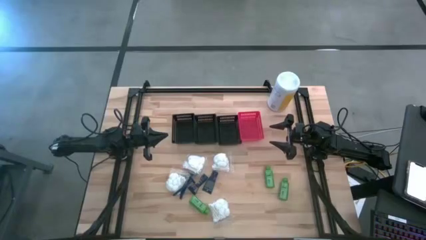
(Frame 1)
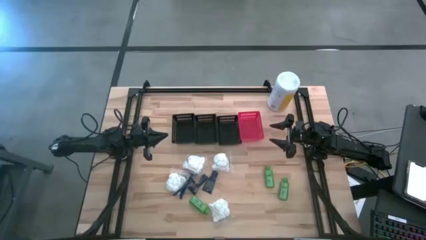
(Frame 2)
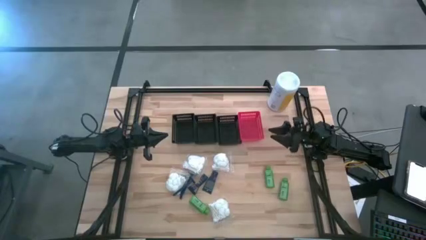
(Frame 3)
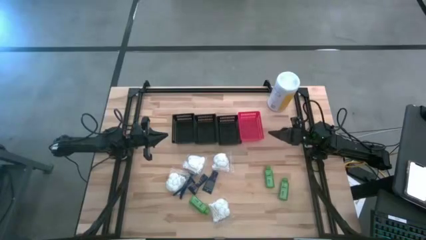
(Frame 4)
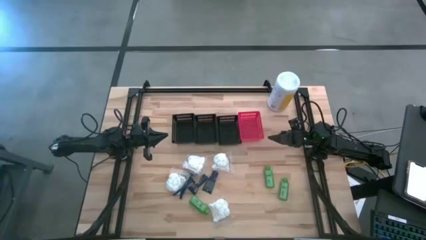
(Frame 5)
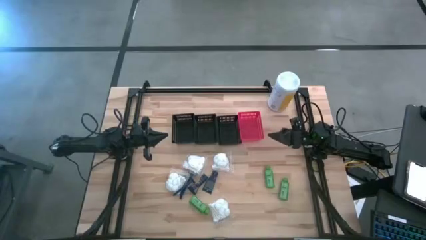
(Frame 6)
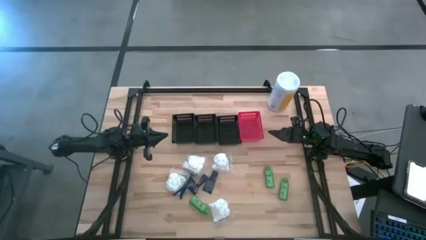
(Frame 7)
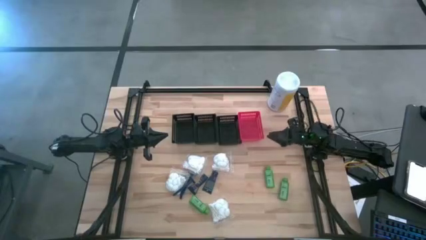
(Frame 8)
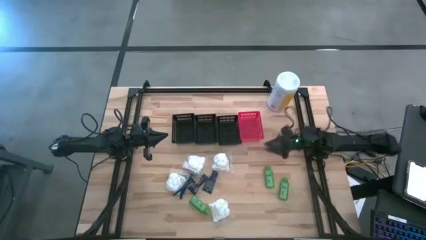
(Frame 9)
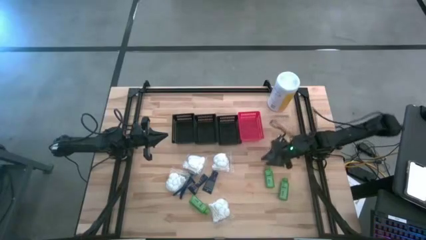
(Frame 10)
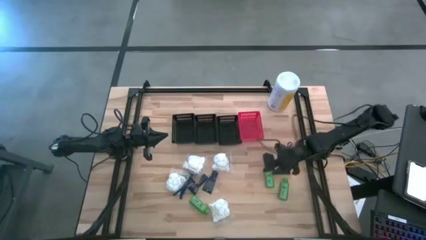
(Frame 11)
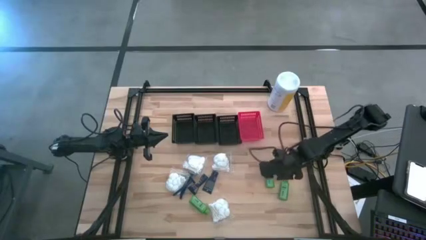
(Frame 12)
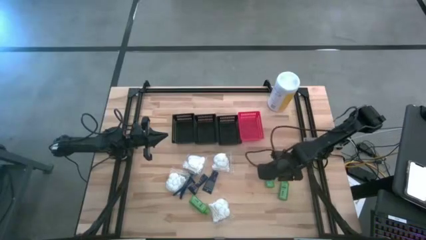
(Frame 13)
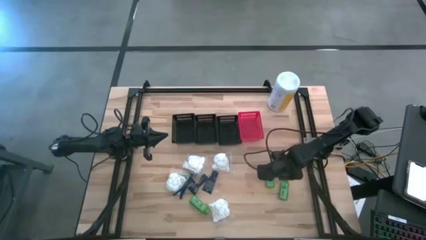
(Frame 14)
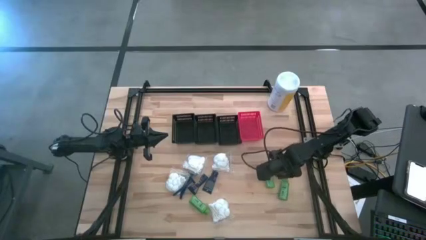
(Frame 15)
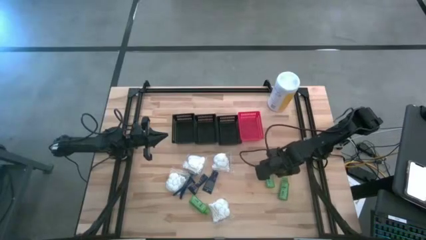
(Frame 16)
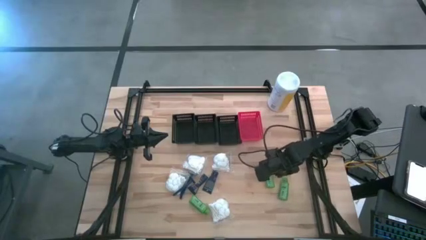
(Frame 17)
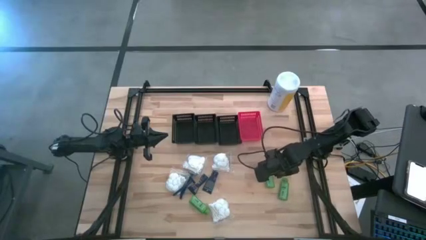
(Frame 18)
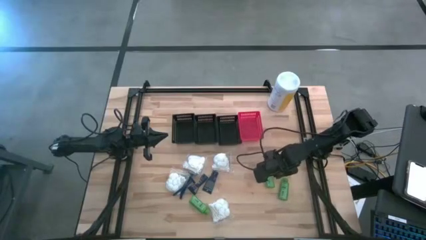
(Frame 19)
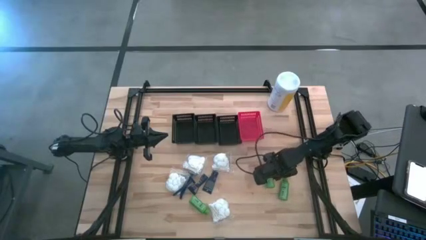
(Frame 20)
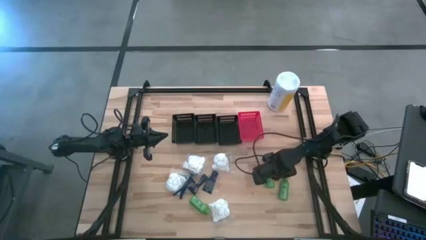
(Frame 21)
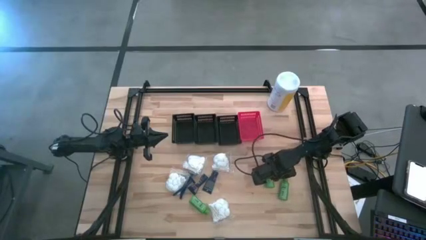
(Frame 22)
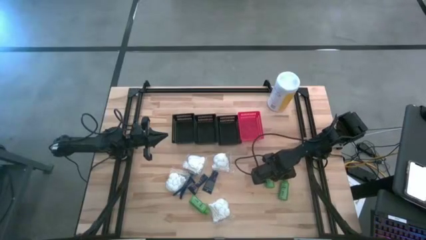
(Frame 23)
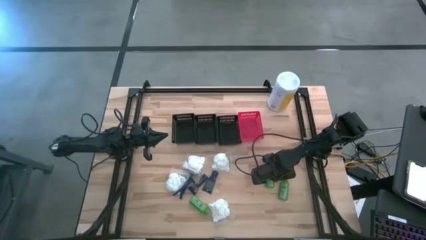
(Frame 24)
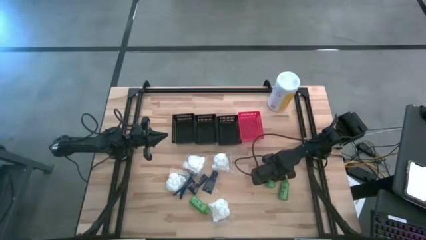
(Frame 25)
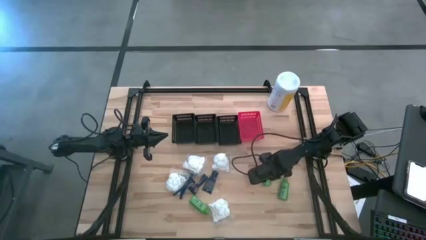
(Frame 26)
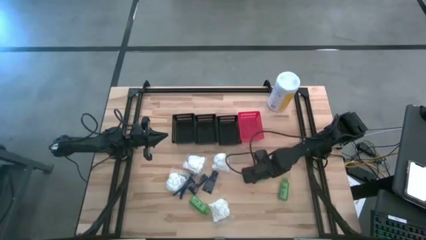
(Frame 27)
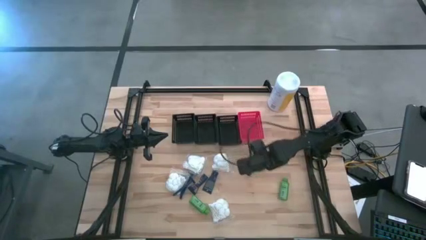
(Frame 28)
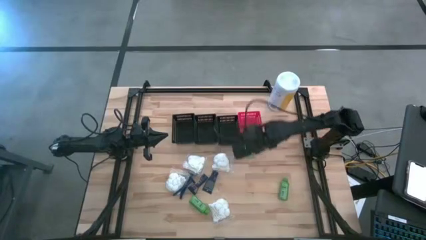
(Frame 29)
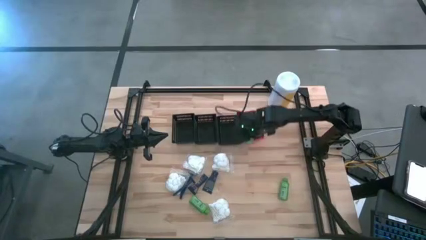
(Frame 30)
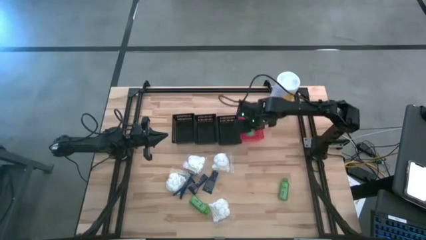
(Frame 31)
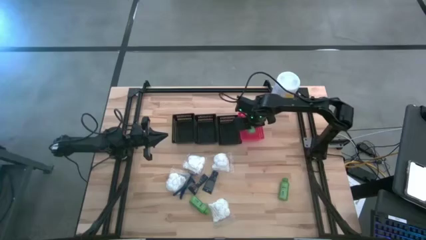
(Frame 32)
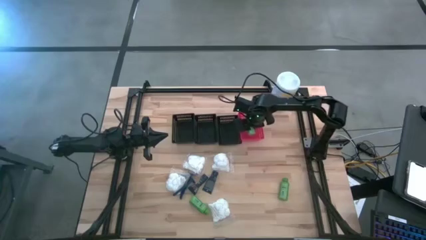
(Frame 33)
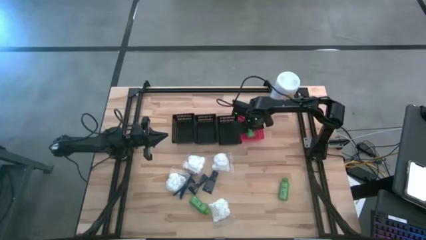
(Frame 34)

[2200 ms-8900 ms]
Task: Pick & Place Travel size toiletries
Put the green shampoo into the red bin

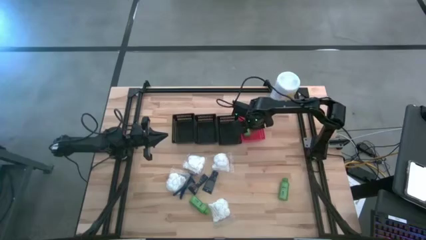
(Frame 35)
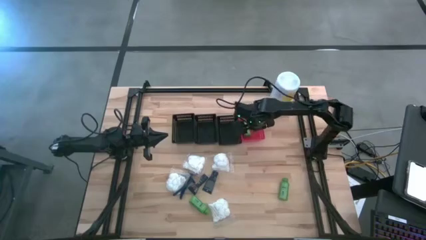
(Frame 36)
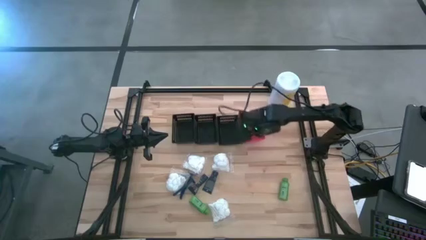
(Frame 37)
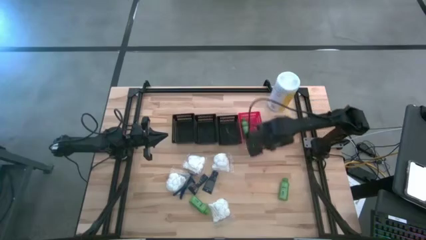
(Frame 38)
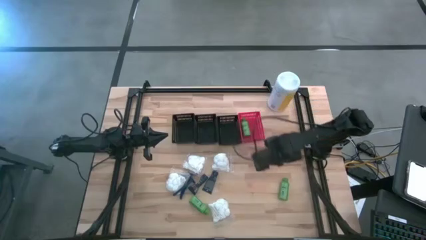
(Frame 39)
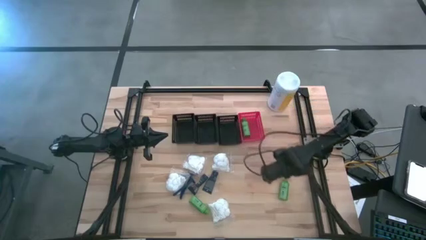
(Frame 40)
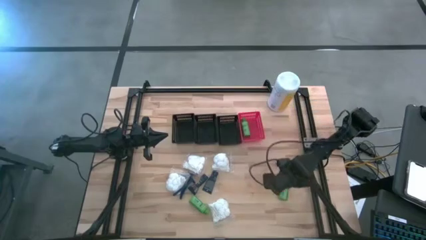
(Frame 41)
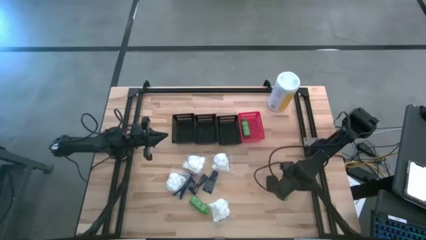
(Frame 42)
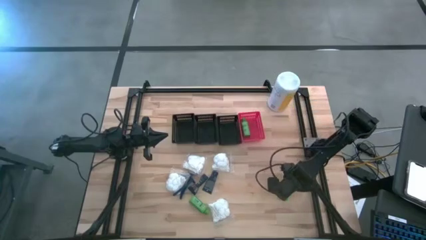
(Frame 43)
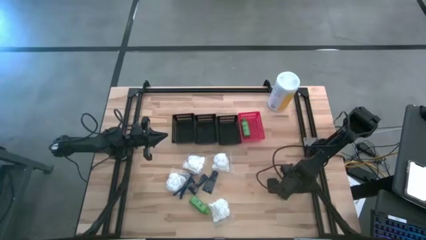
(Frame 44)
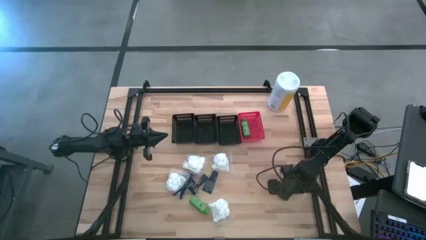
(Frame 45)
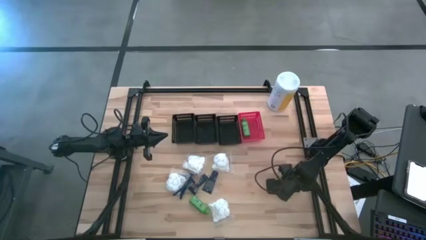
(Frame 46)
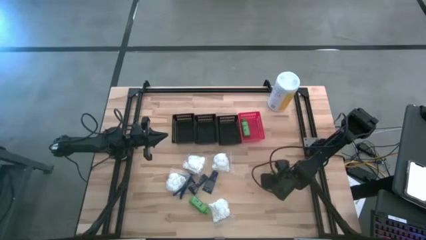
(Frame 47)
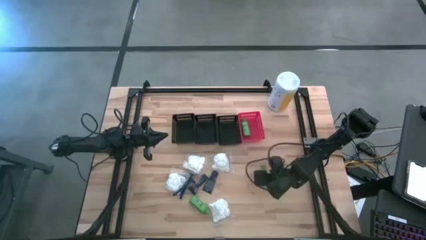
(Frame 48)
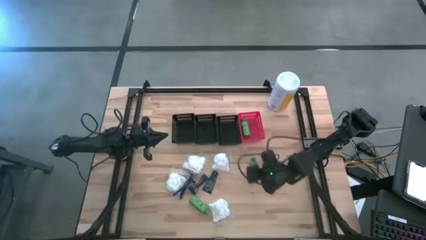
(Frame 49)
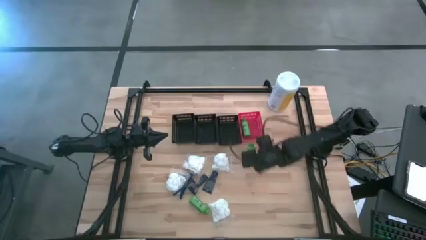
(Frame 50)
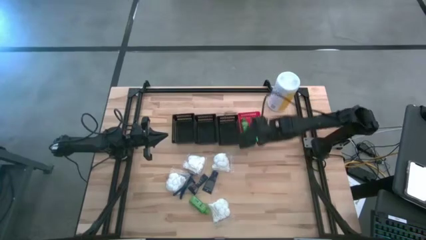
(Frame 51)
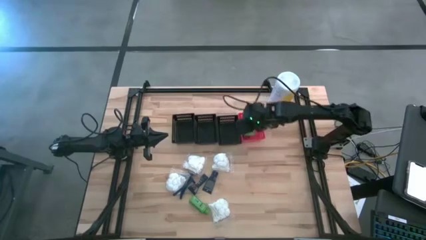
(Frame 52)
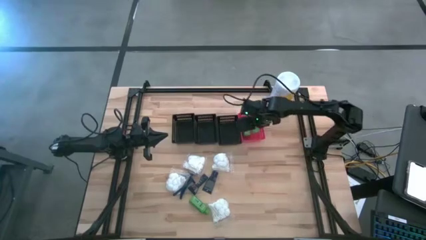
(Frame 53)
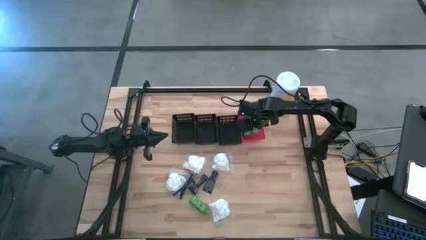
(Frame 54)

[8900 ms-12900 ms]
Put the green shampoo into the red bin

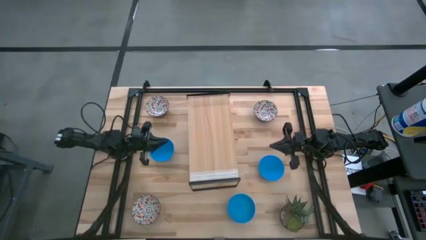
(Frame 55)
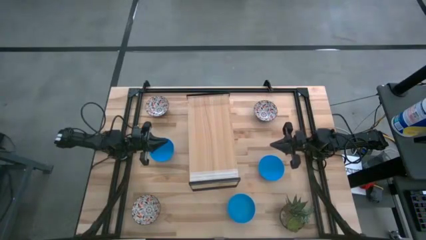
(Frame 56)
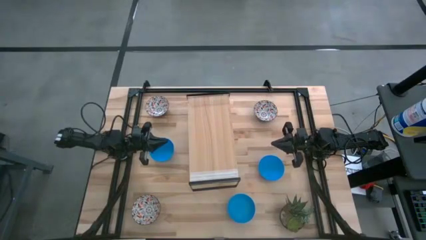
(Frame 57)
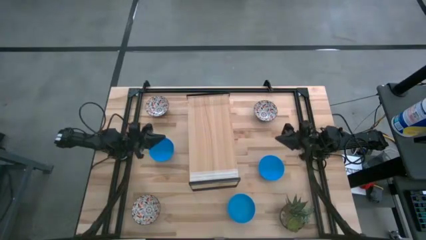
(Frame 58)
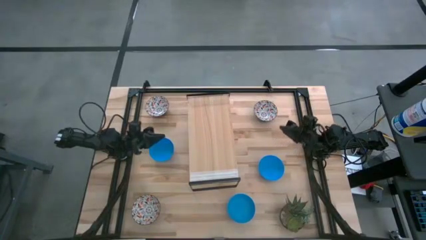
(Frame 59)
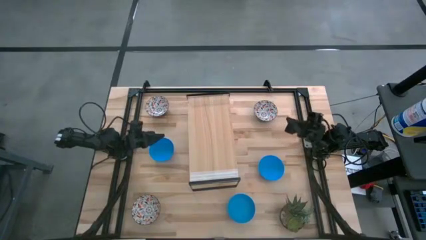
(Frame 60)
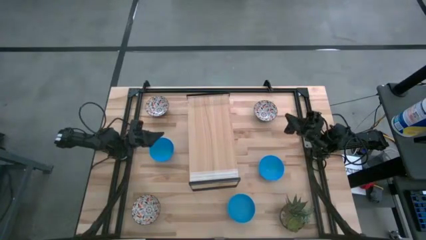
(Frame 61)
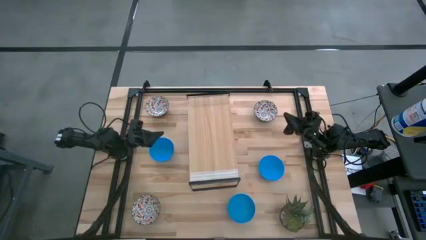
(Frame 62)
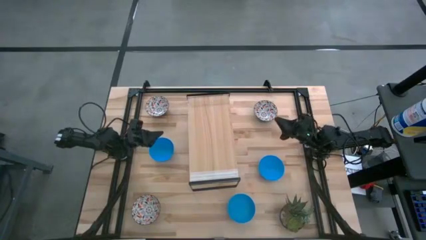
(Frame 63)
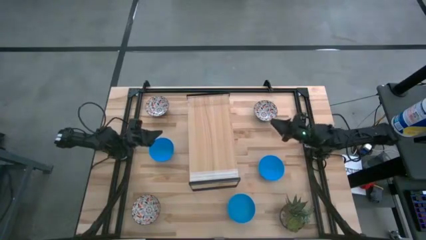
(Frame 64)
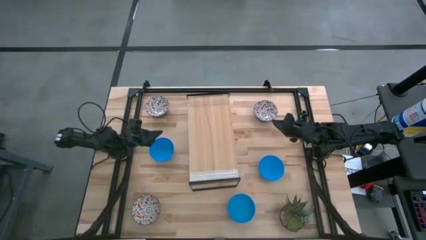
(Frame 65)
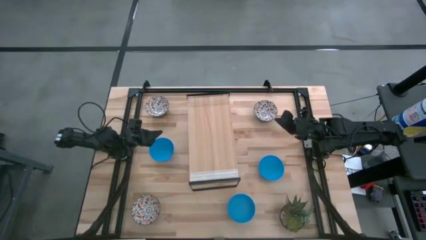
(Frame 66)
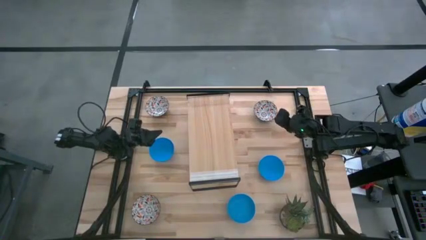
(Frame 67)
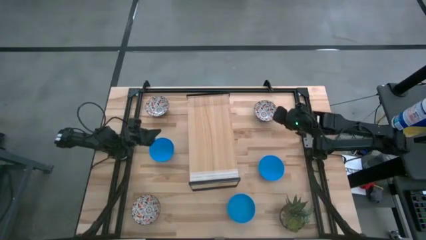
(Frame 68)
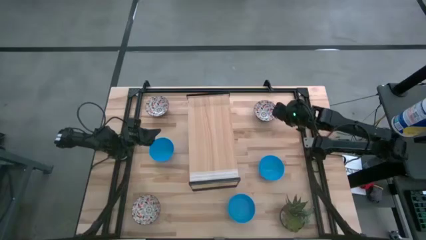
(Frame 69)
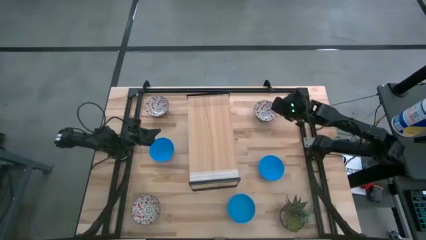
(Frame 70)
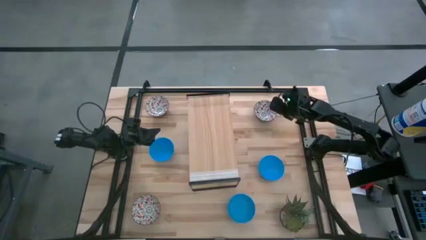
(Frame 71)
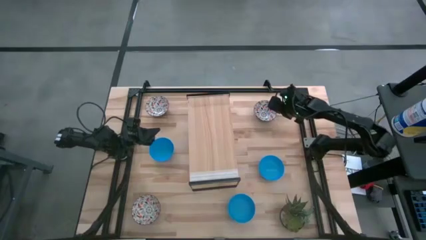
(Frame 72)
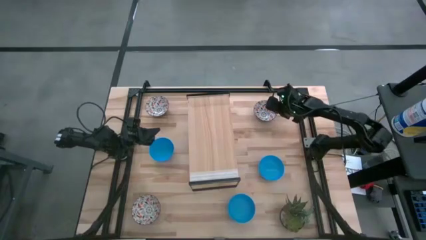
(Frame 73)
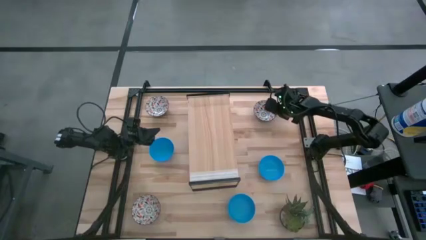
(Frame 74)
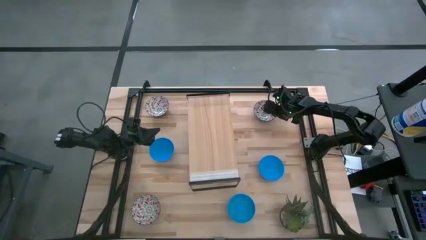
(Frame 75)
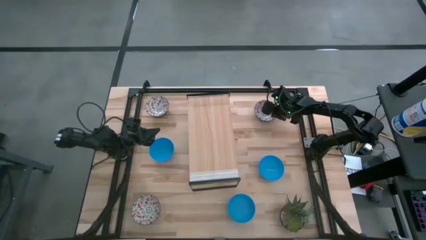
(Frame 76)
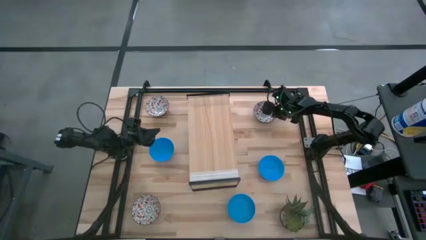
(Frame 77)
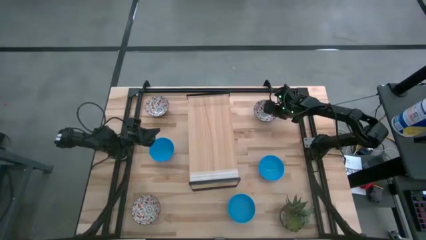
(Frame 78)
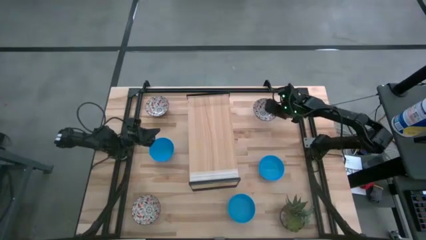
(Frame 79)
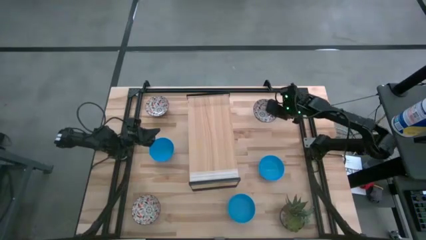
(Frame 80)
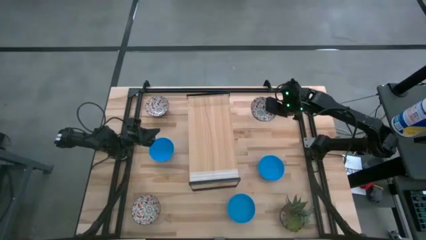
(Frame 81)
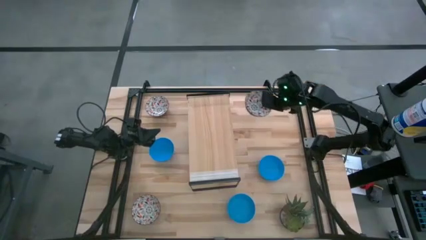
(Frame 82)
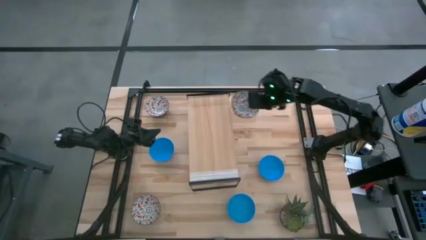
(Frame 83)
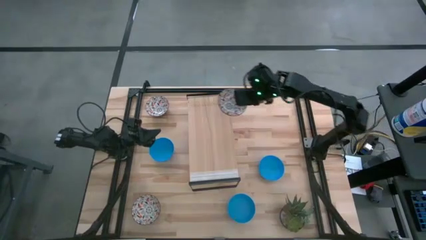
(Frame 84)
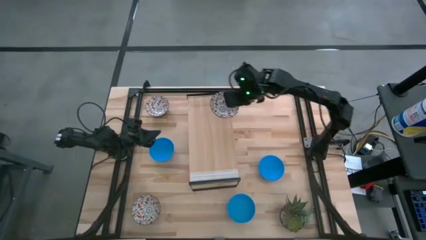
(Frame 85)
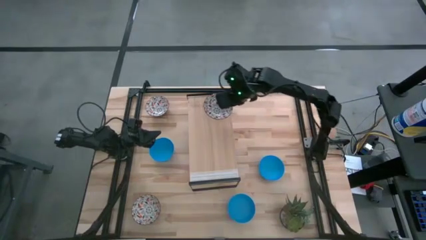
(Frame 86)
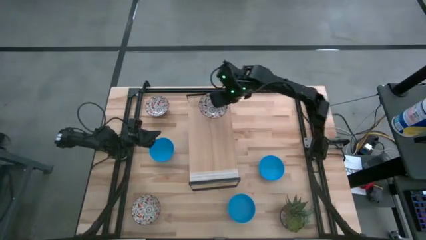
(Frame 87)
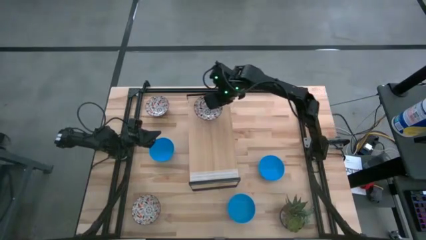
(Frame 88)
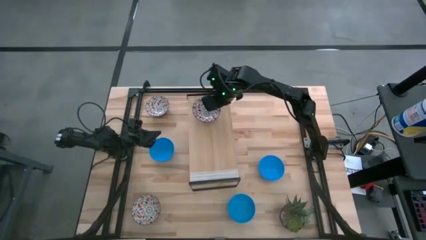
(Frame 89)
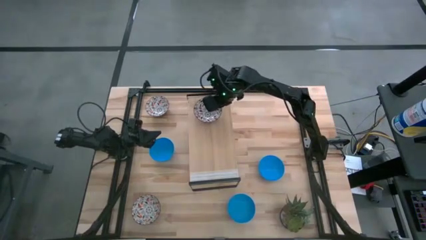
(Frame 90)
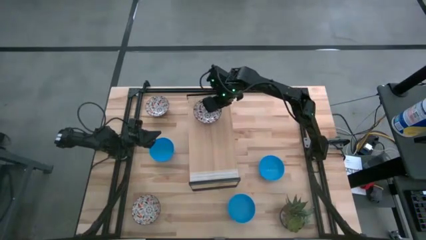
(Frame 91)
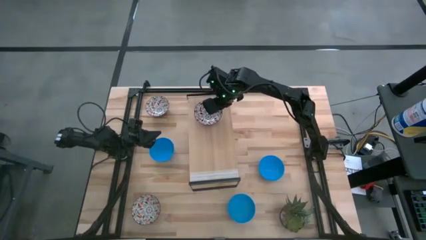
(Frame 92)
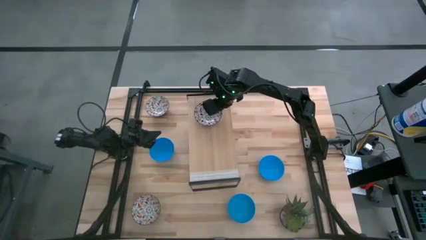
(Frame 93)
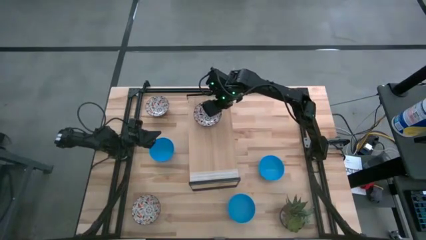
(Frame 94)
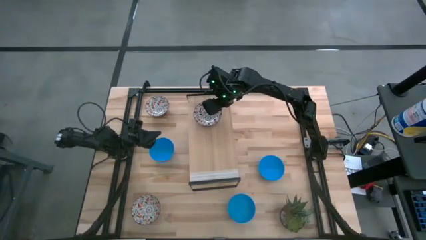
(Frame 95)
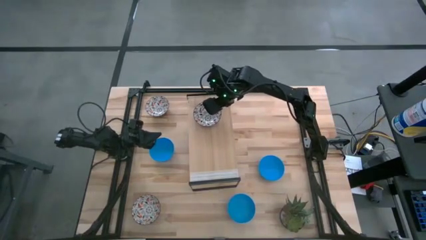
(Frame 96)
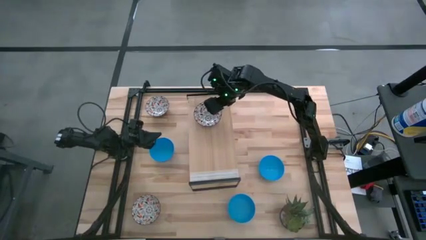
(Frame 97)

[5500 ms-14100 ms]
Task: Pick & Place Mini bowls
Put the top right white patterned bowl on the shelf
